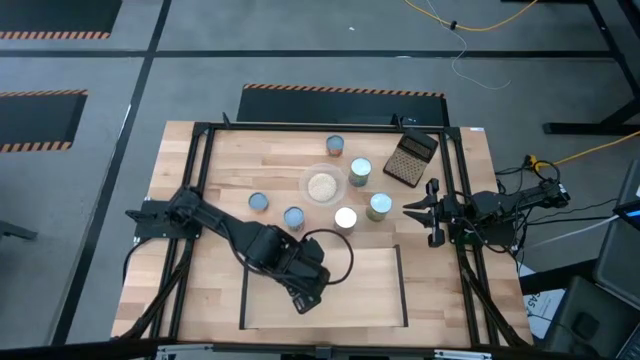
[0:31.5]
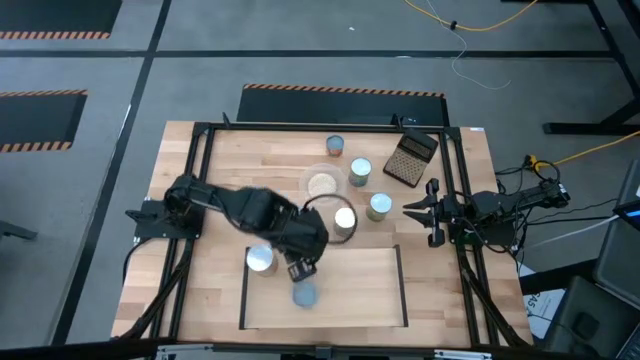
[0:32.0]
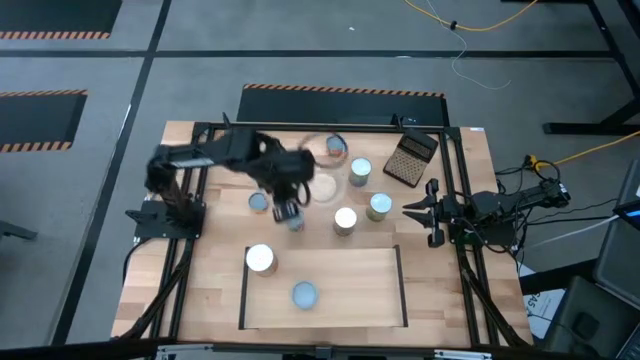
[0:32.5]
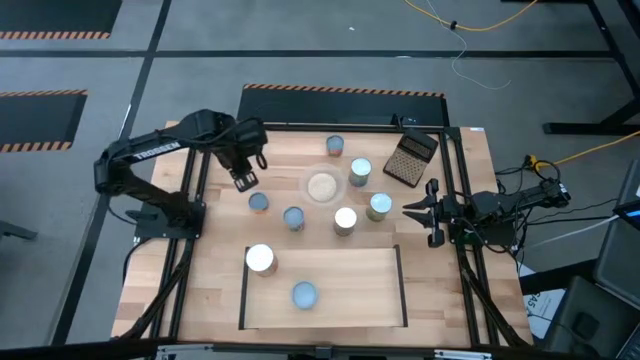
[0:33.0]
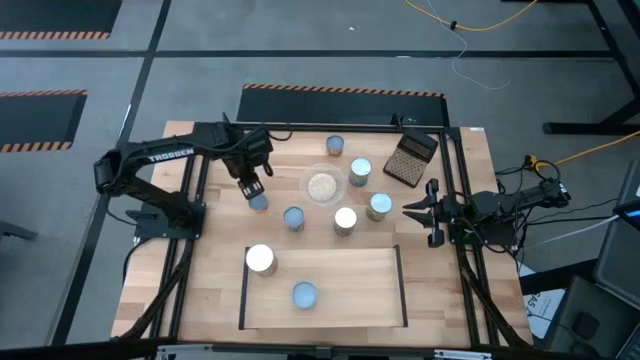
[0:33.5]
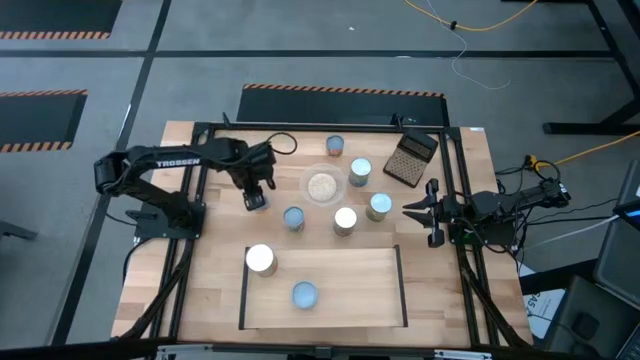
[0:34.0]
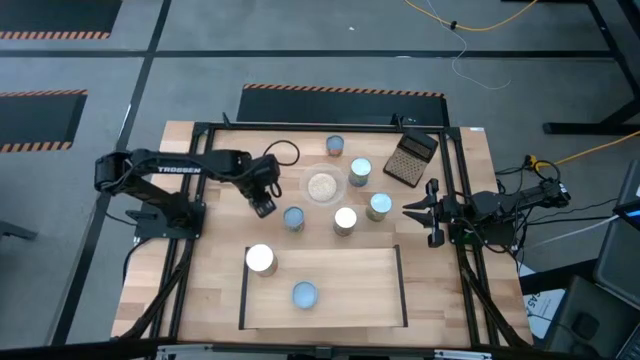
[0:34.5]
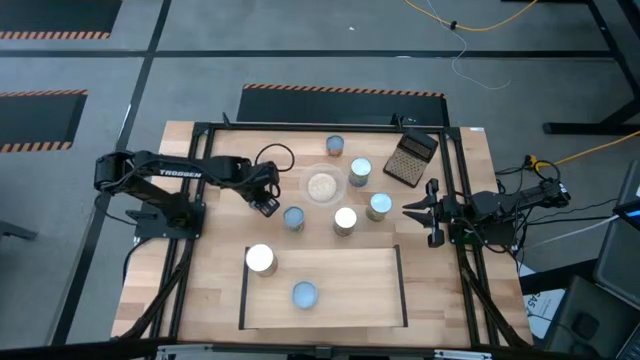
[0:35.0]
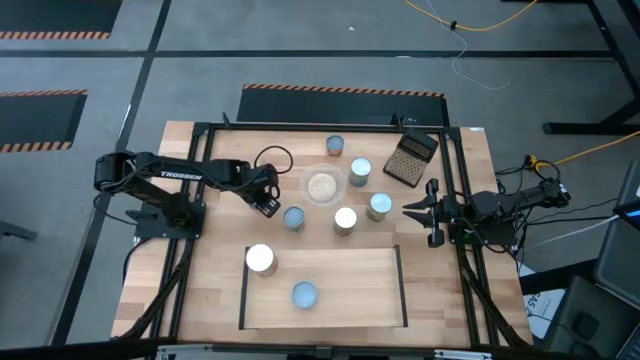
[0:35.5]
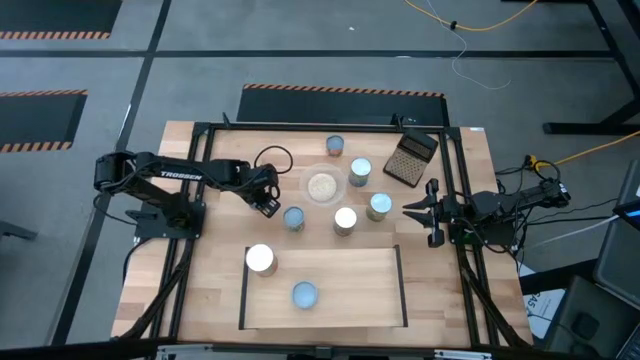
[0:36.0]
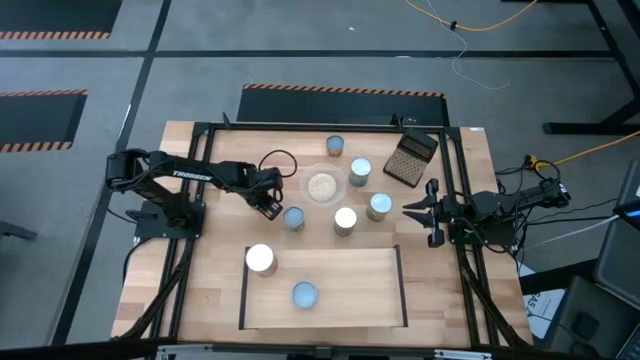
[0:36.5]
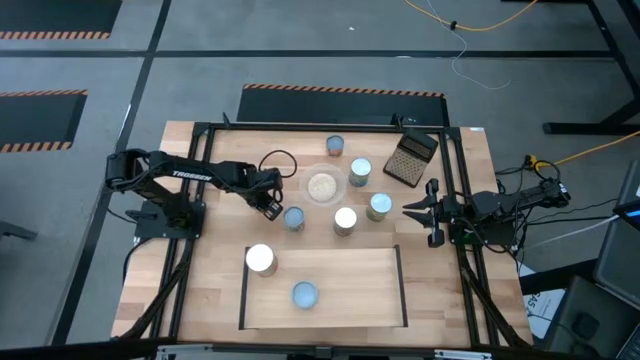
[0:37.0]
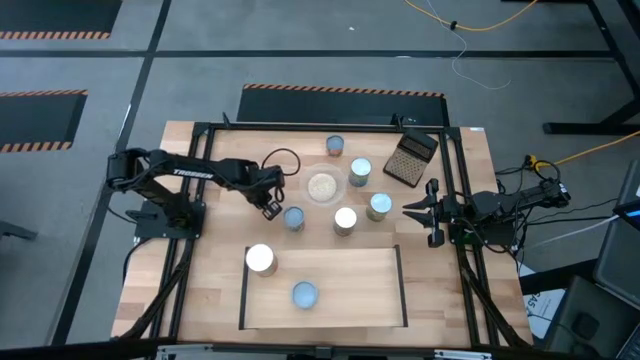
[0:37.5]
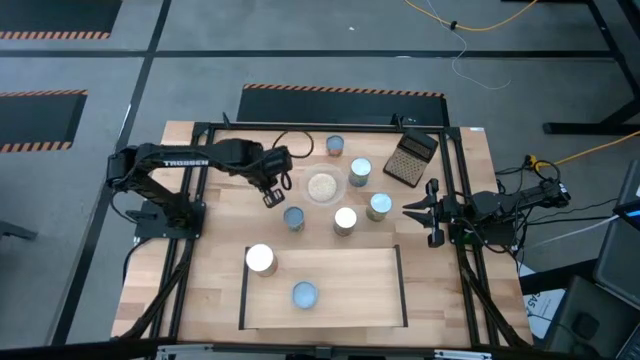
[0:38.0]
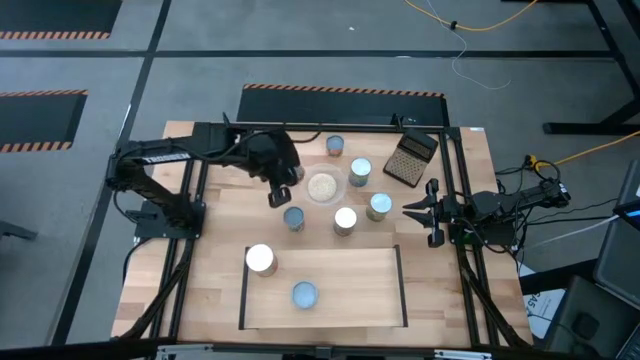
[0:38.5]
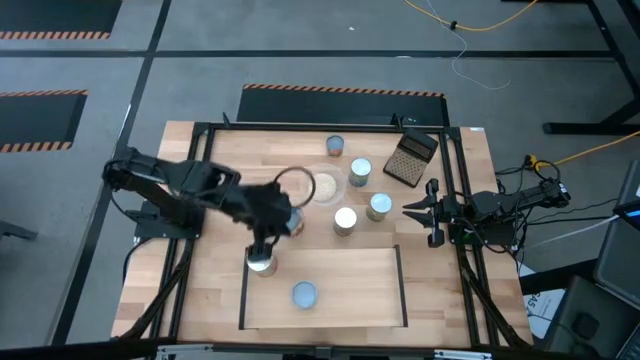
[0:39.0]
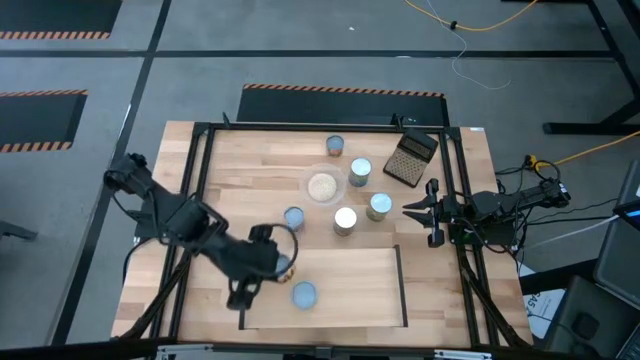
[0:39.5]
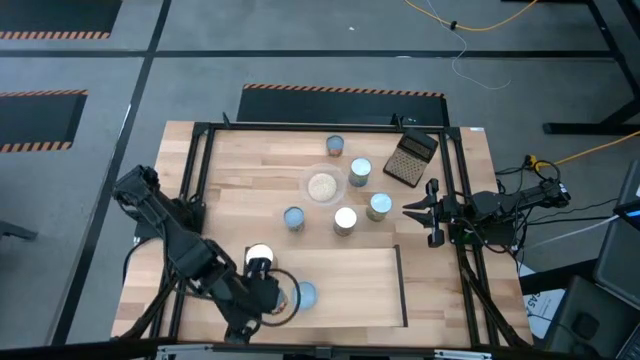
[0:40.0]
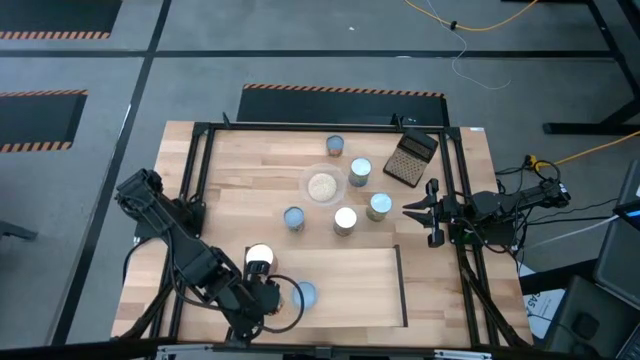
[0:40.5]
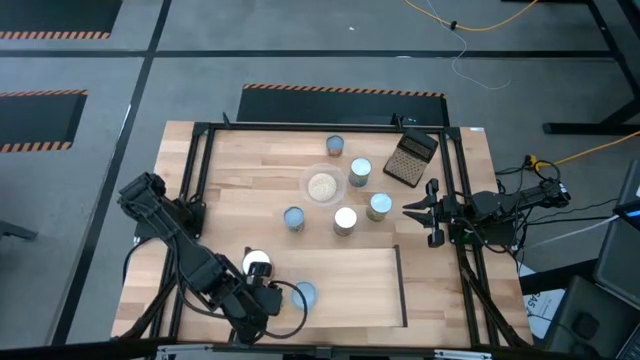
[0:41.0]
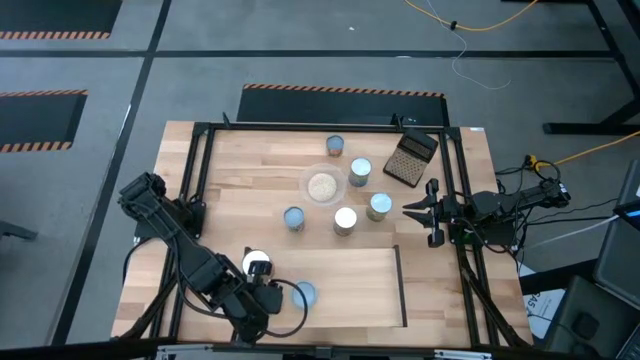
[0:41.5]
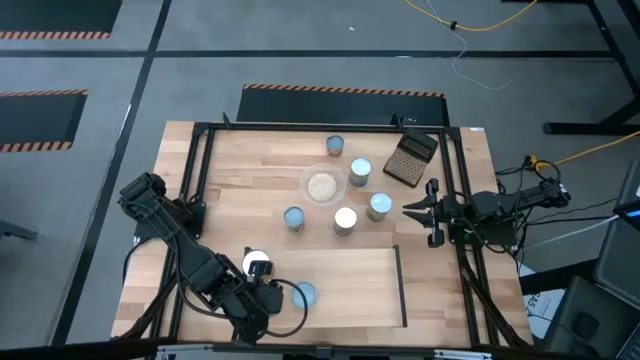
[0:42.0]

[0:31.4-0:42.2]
Task: Pick and place cans onto a shelf
Put the canned pineapple rings on the shelf

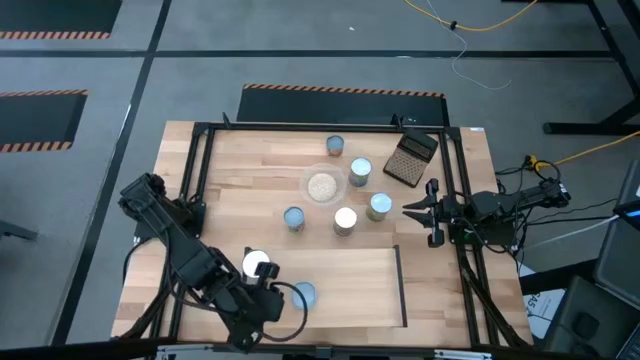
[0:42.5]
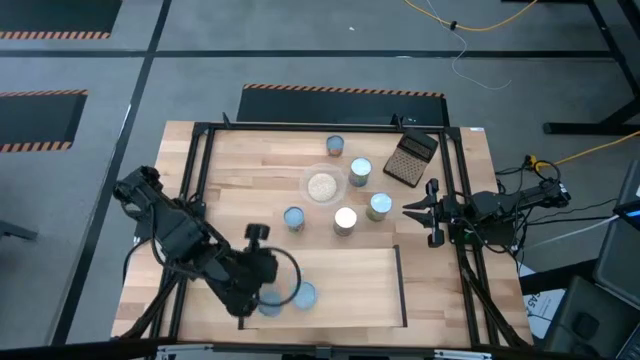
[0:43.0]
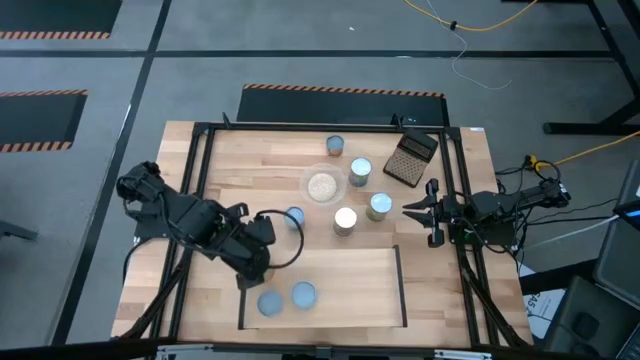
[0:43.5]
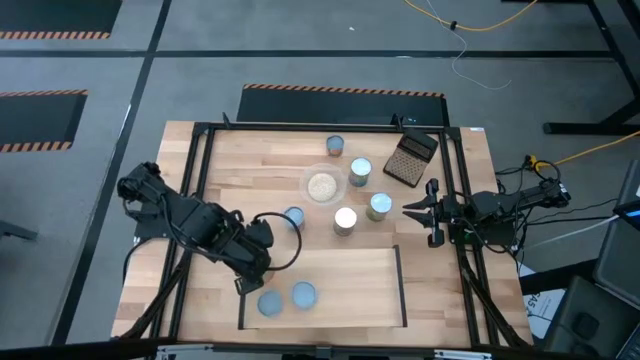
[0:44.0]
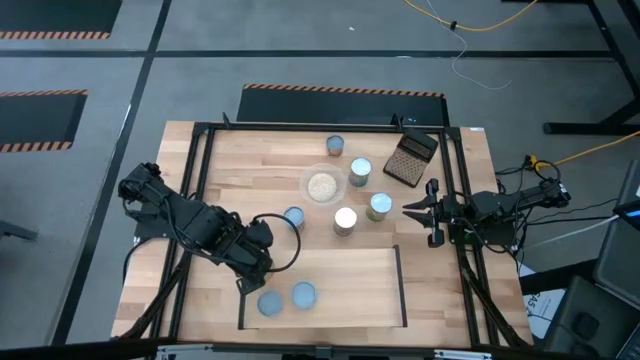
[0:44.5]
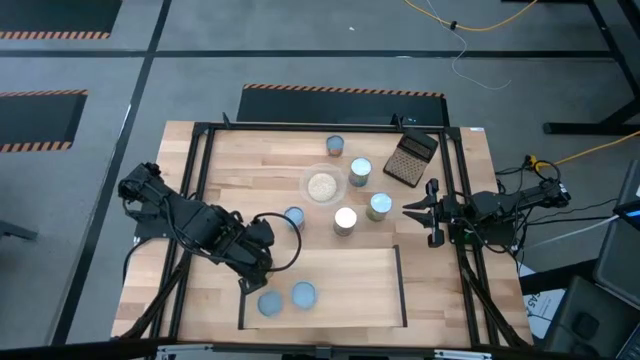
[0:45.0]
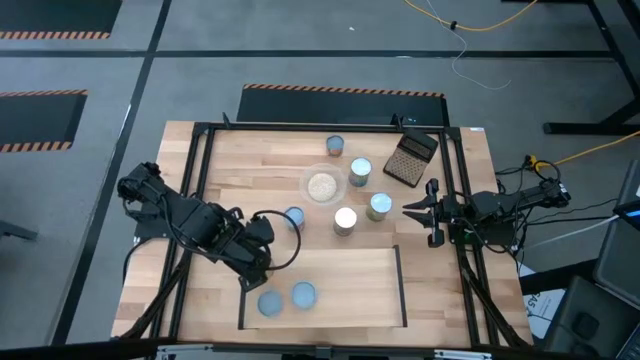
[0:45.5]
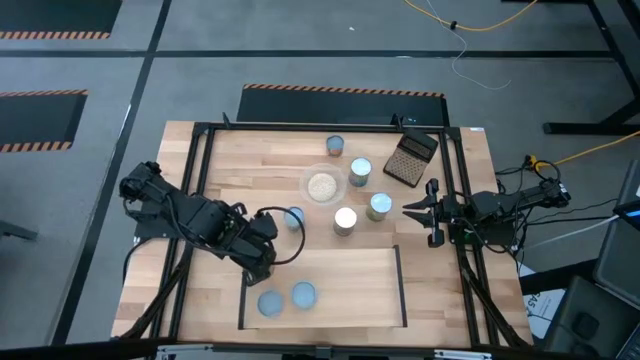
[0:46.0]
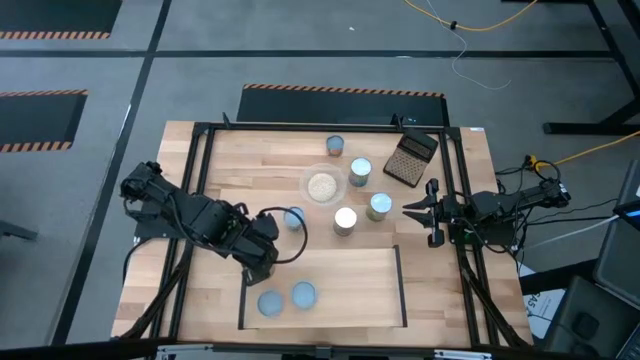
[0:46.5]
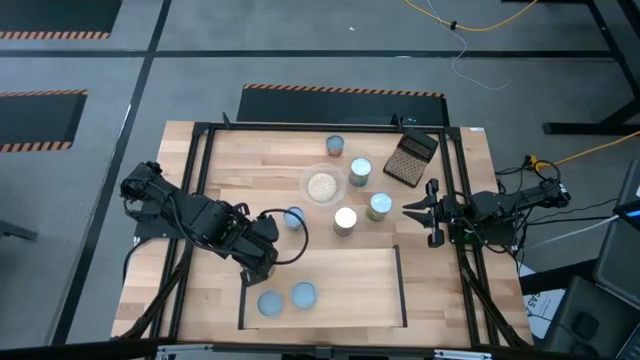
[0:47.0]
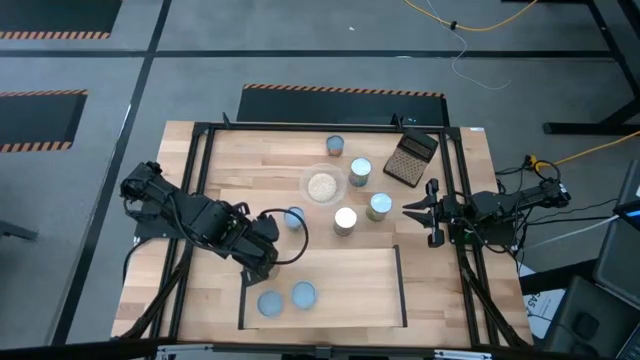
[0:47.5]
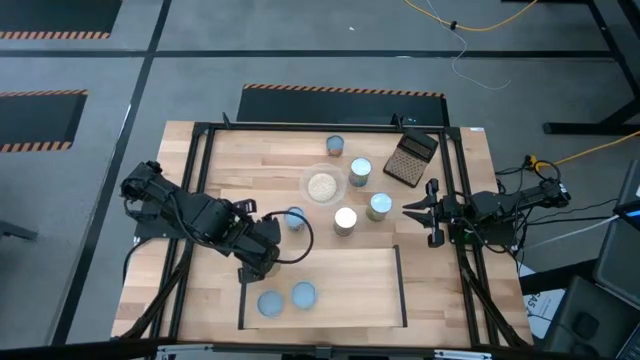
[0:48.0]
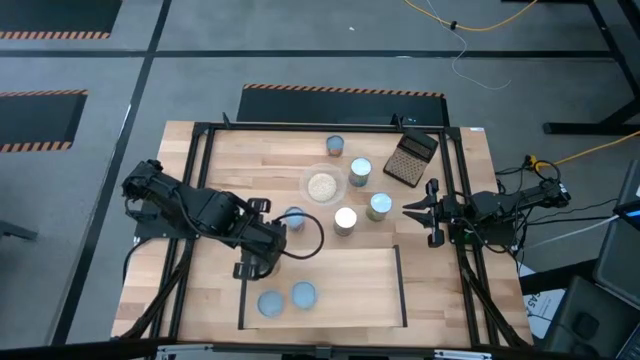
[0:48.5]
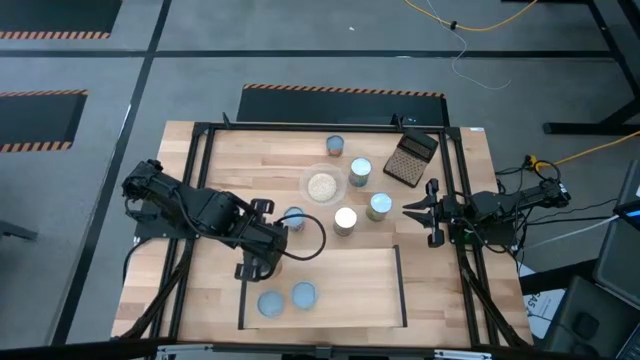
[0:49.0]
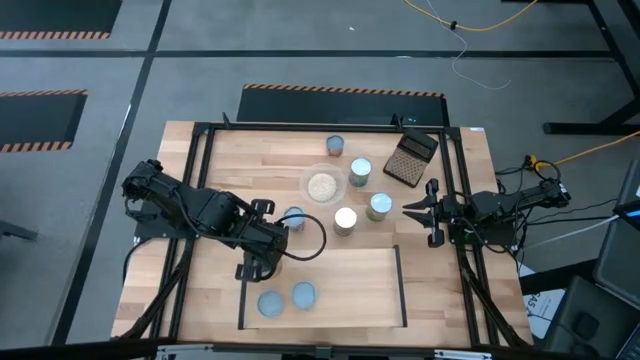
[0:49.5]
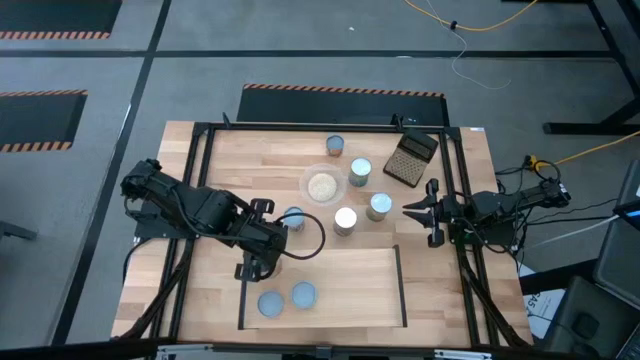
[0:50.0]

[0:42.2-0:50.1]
Adjust the canned pineapple on the shelf

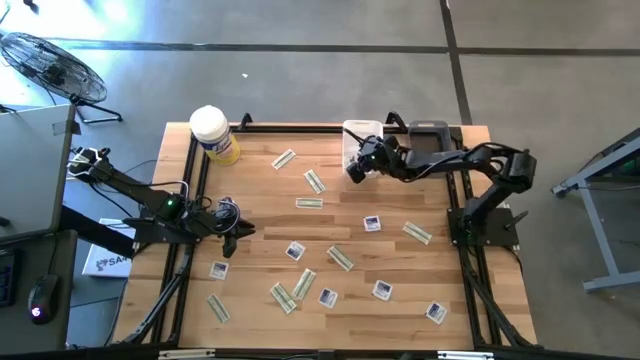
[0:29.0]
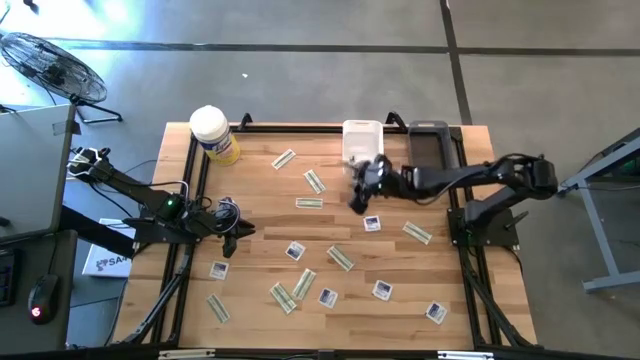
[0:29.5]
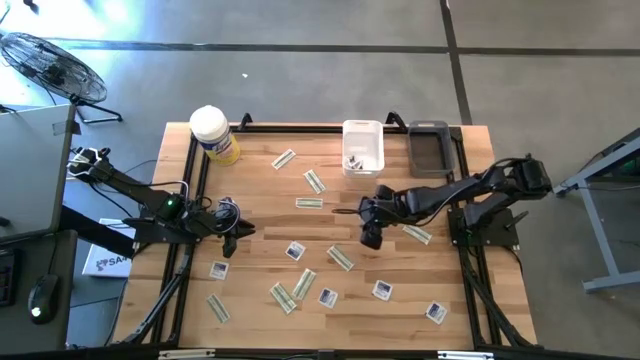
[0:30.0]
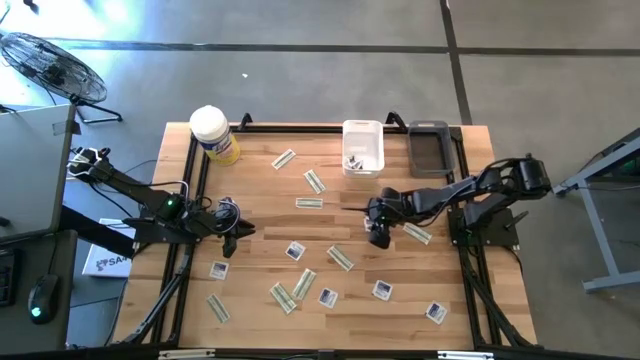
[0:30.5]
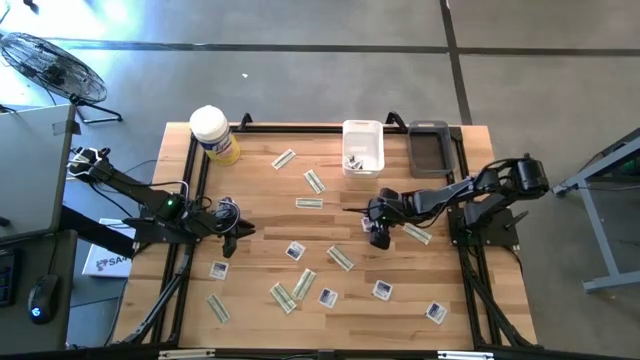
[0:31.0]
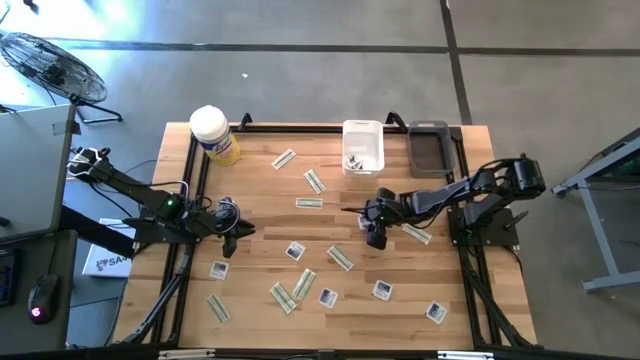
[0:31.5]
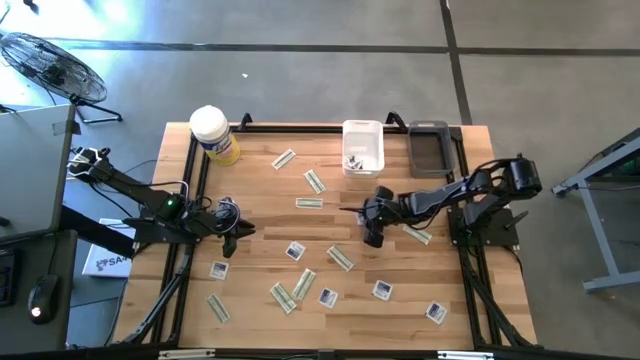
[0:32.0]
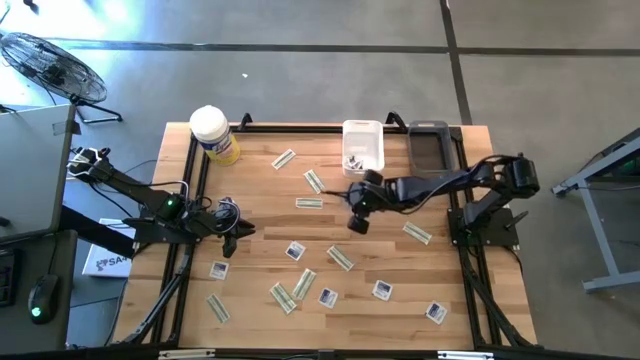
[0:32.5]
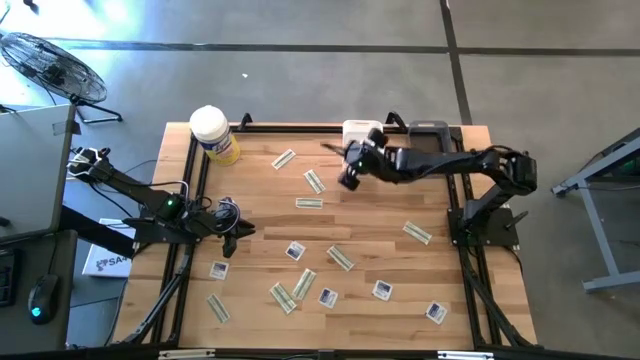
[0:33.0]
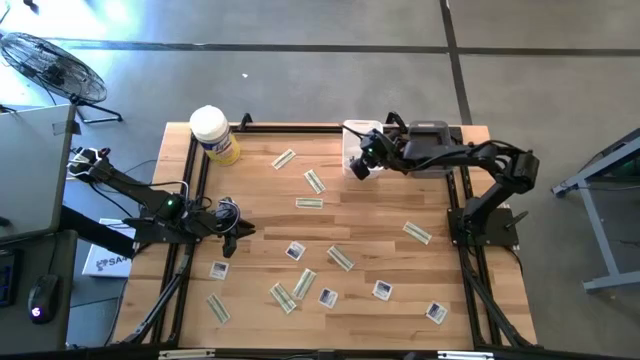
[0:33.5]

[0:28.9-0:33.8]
Task: Pick & Place First Aid Supplies
Put the blue alcohol pad into the white bin
